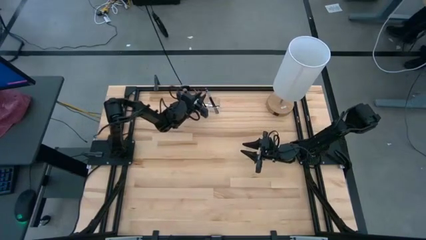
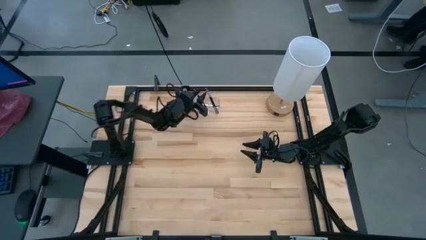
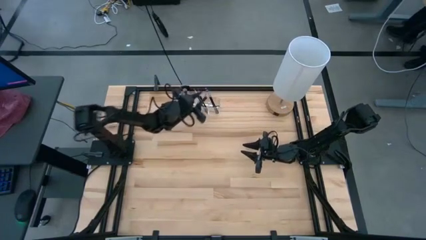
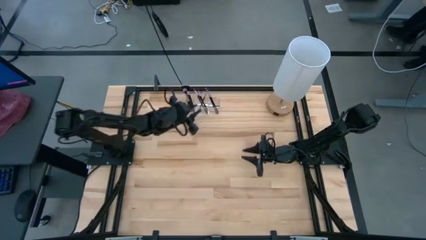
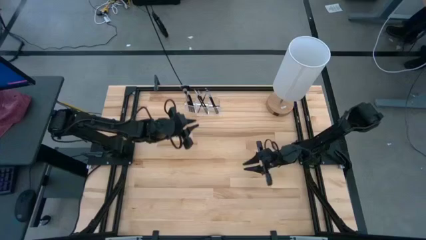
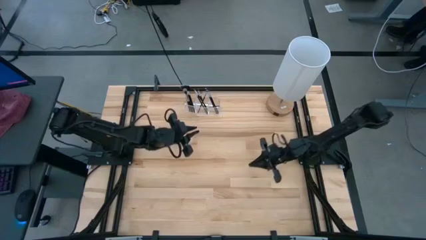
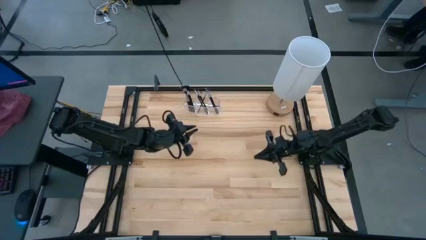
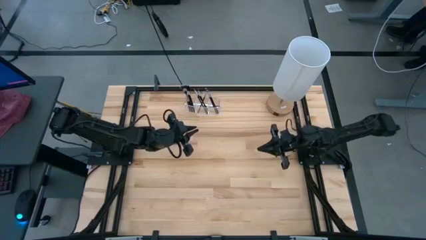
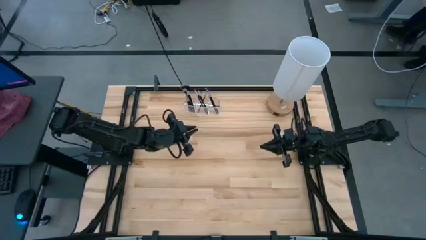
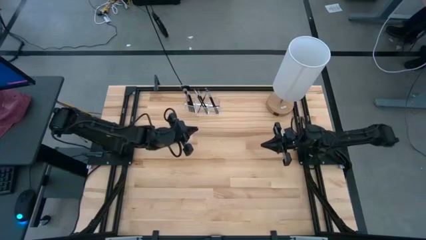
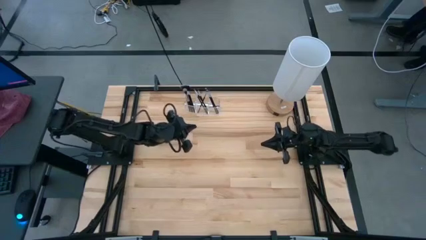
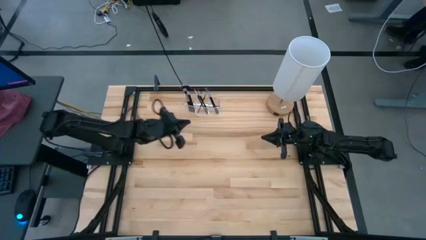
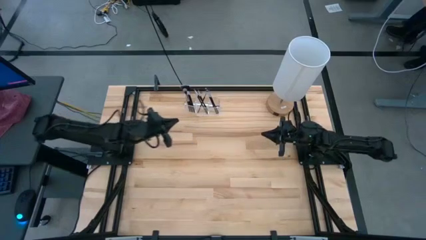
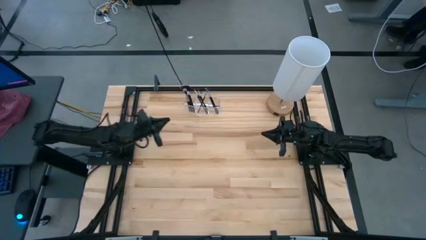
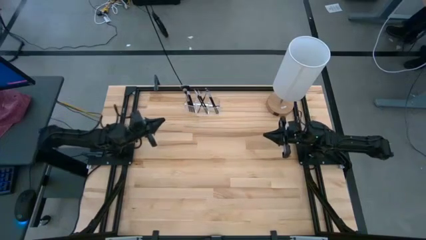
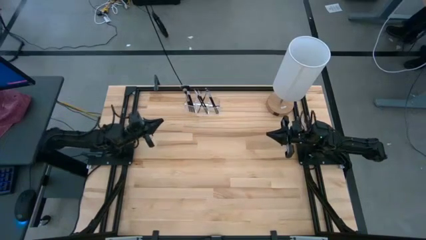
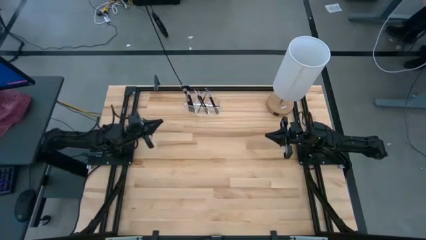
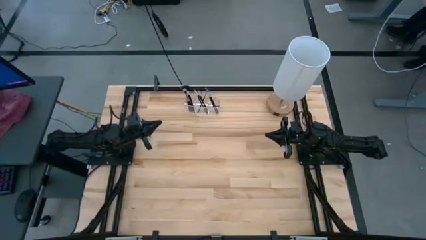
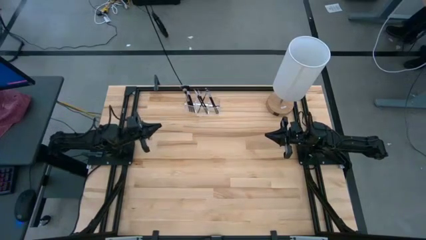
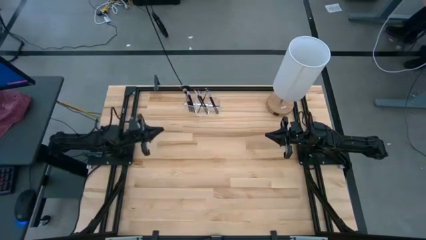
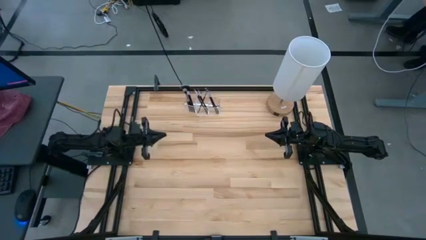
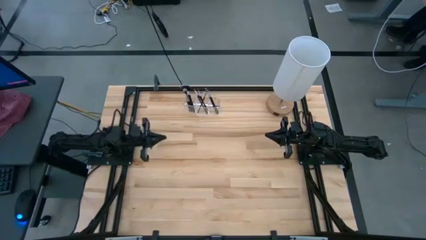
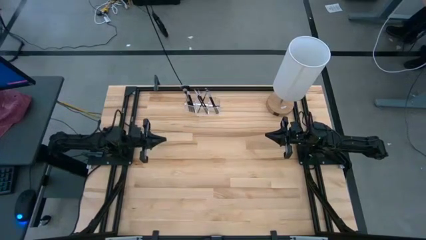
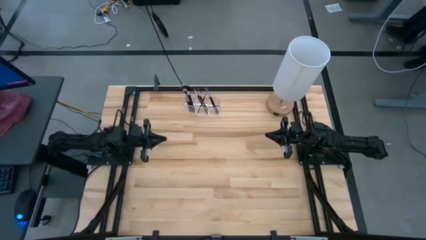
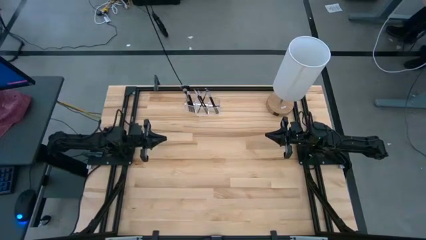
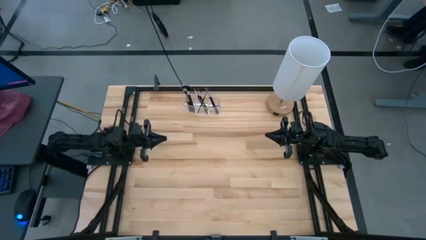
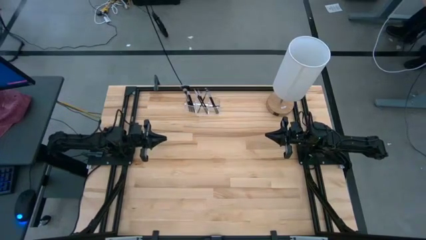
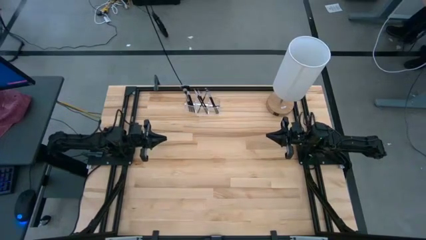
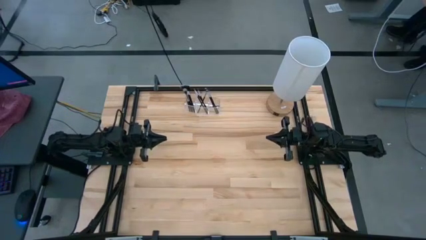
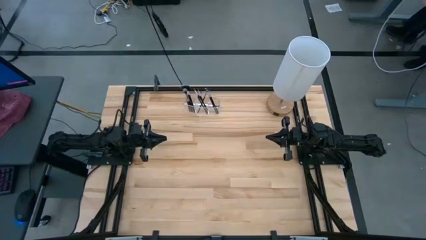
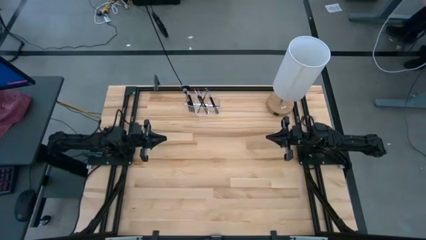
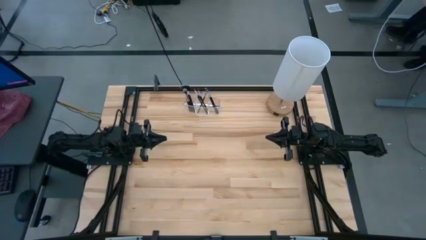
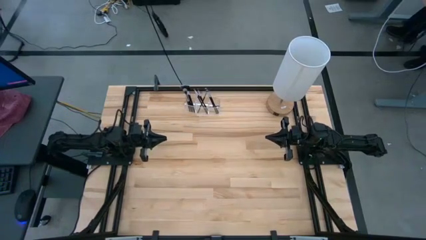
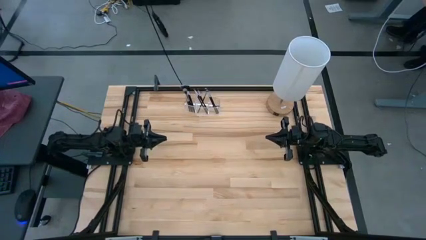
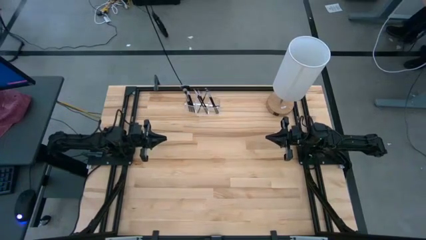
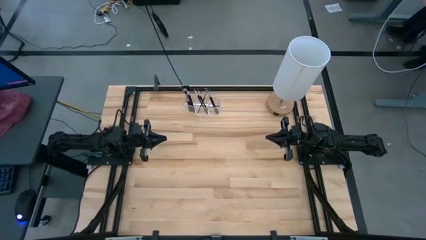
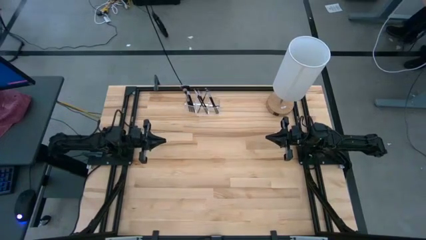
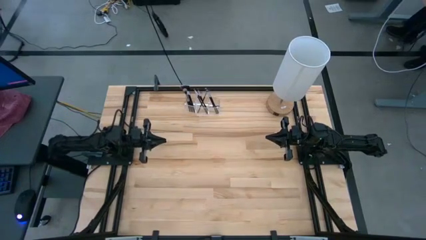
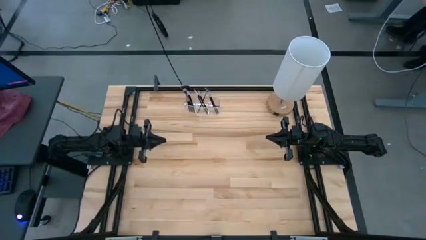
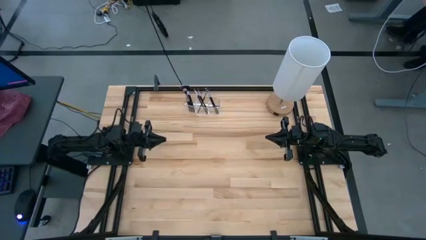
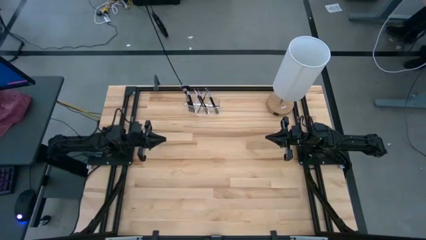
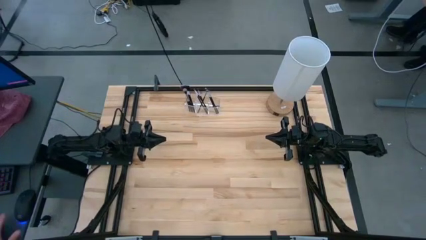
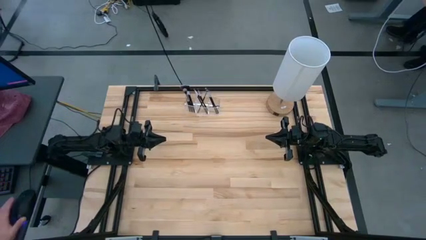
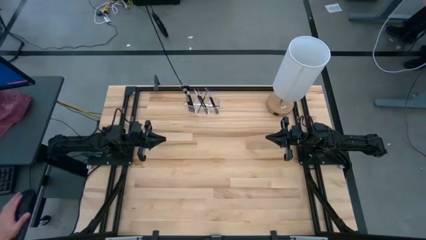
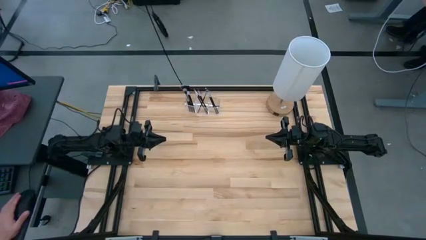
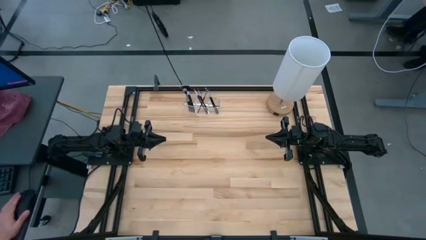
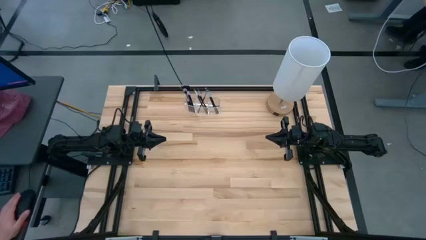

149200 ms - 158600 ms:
Task: Put items in baskets/containers
Return to Home Position

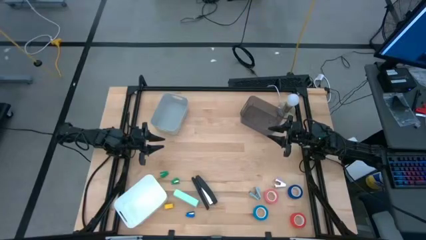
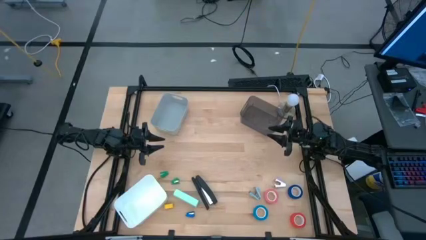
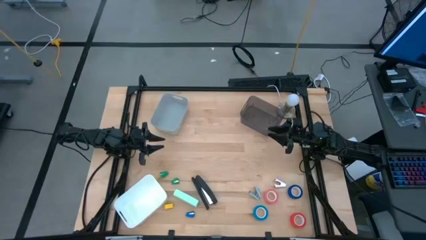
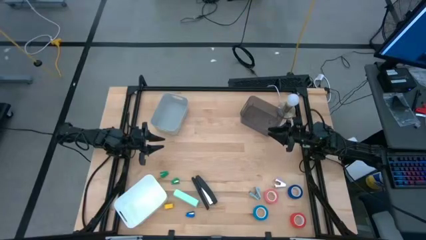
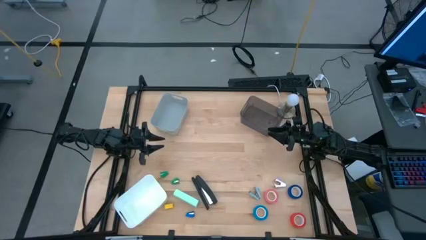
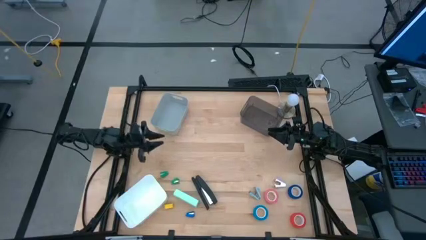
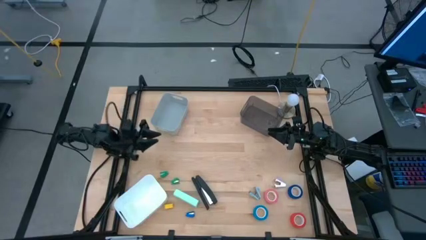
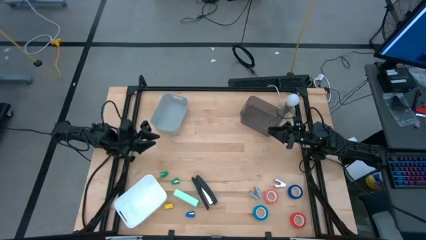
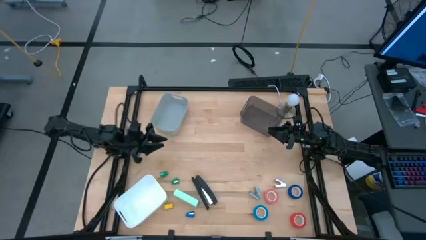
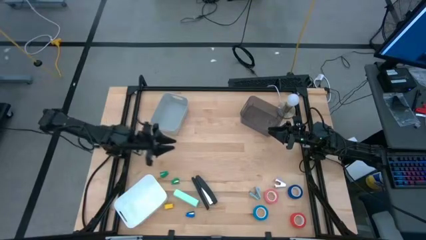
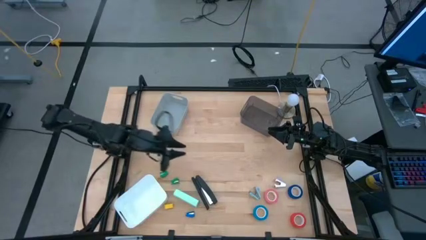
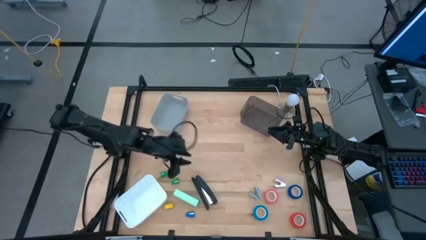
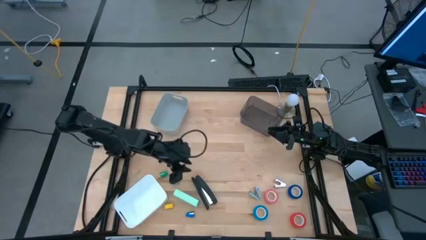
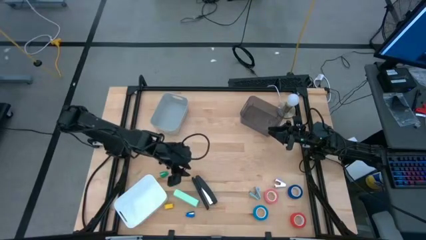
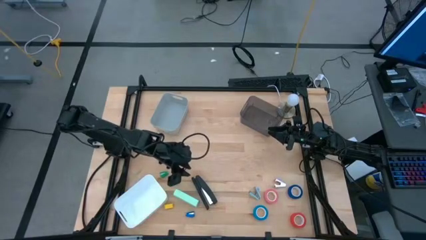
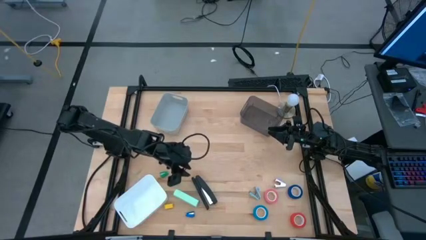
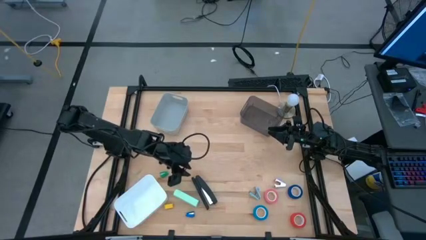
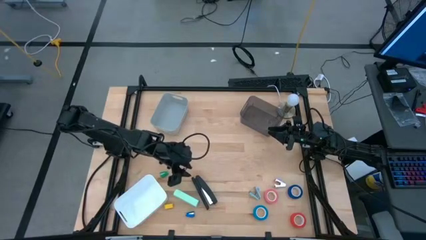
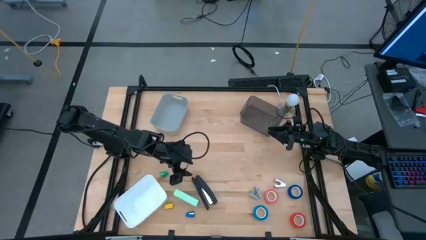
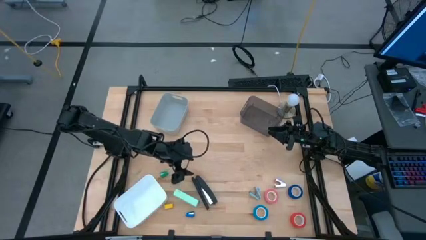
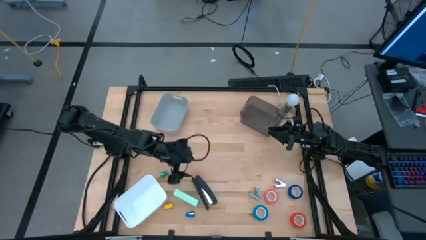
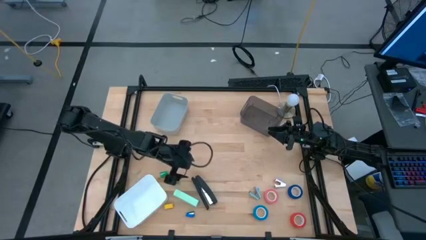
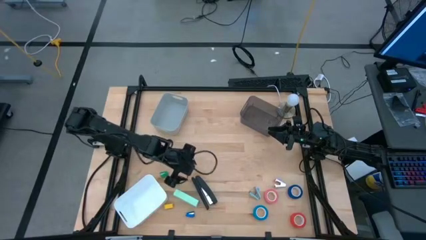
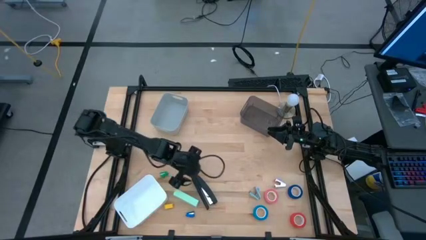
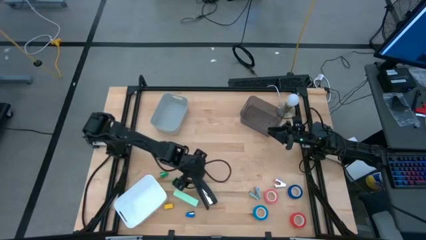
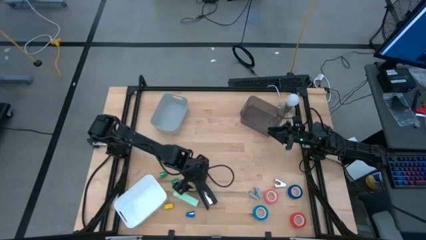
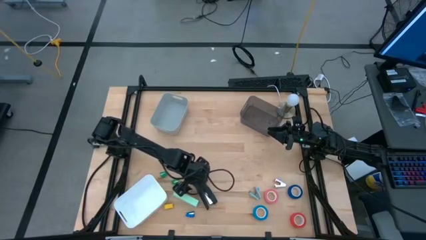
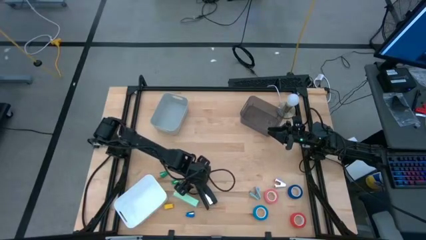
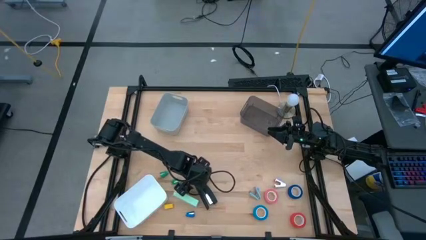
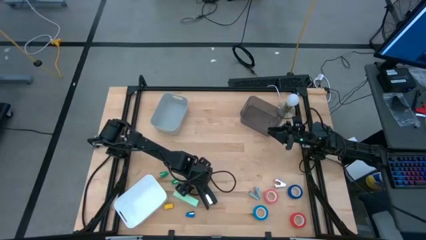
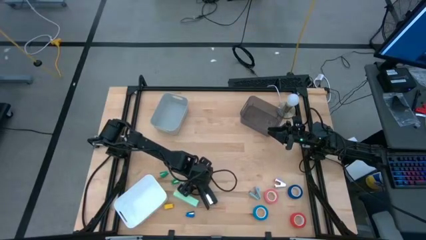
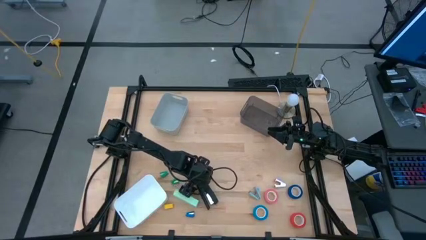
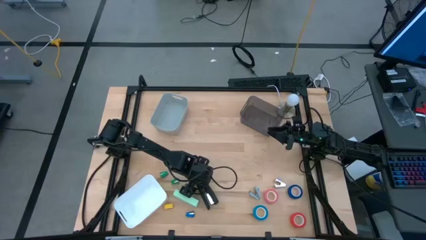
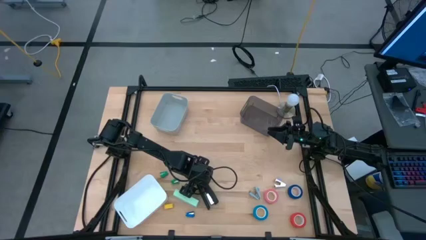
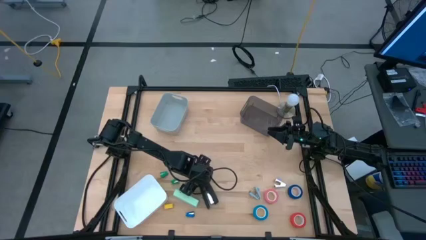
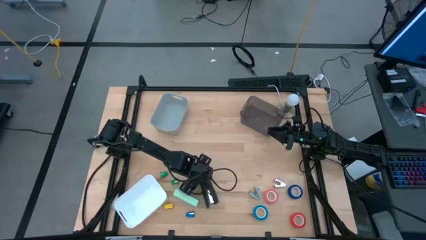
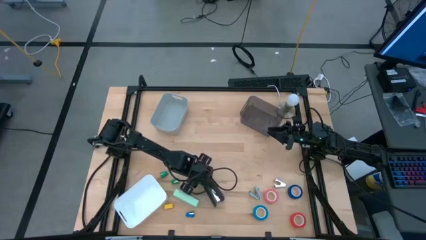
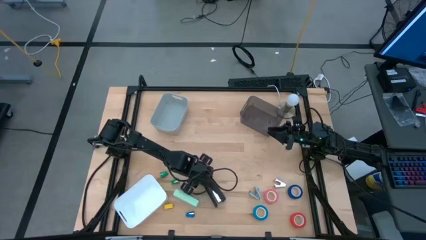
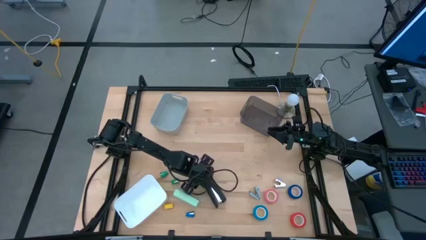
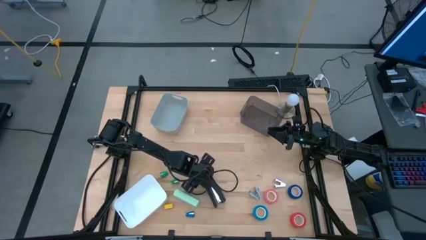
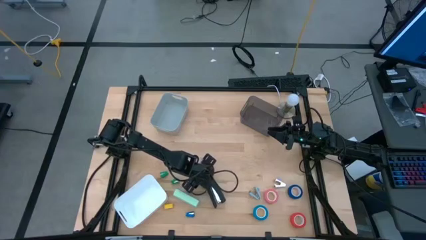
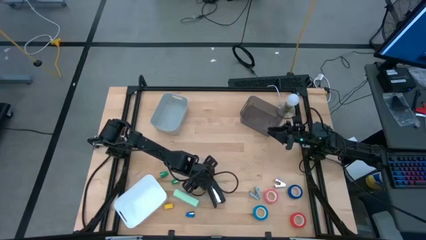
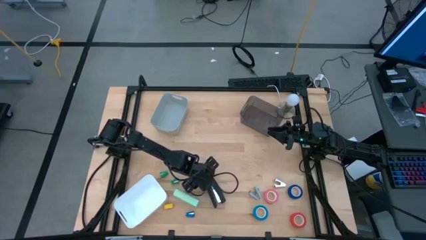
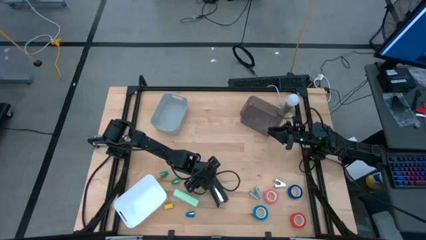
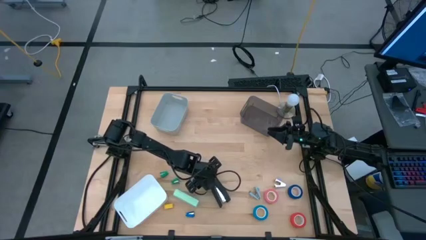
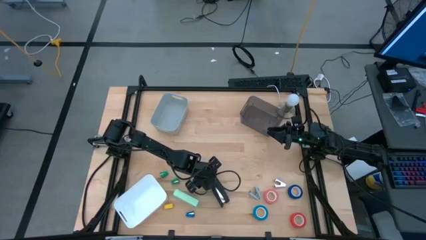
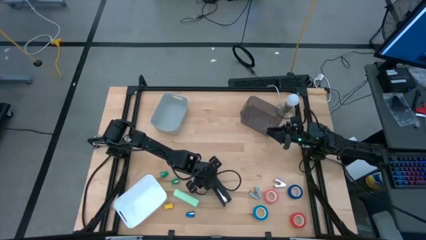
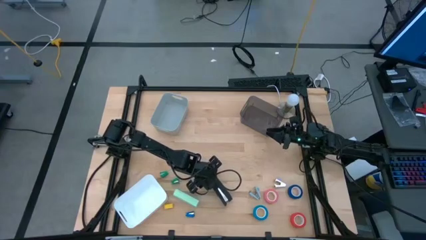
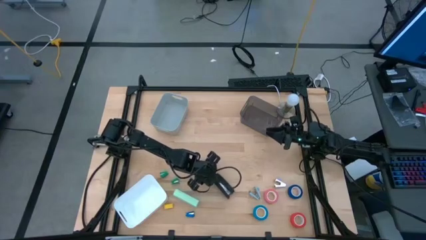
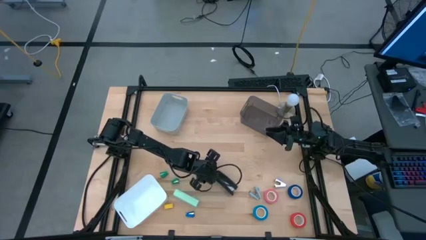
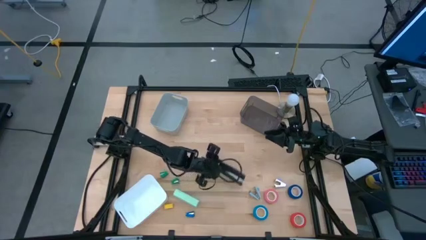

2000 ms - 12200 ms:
Task: Pick and place Stapler, Stapler remover, tape
Put the black stapler into the black bin
